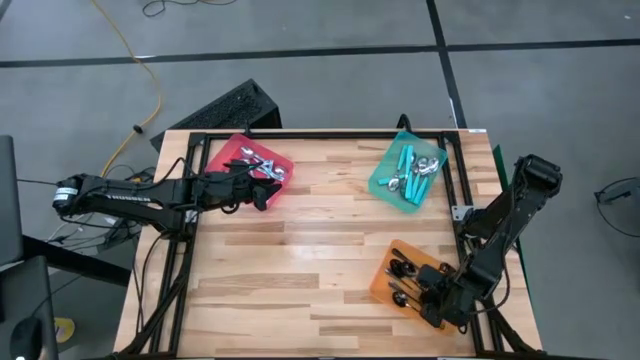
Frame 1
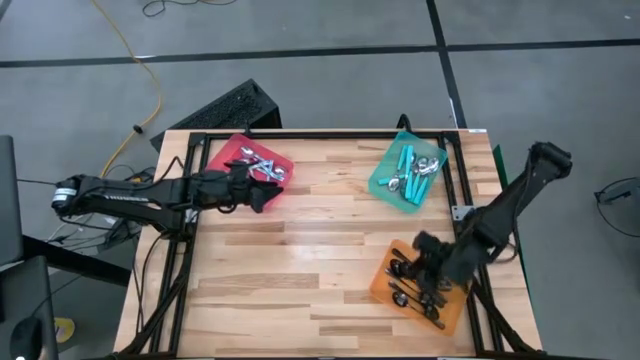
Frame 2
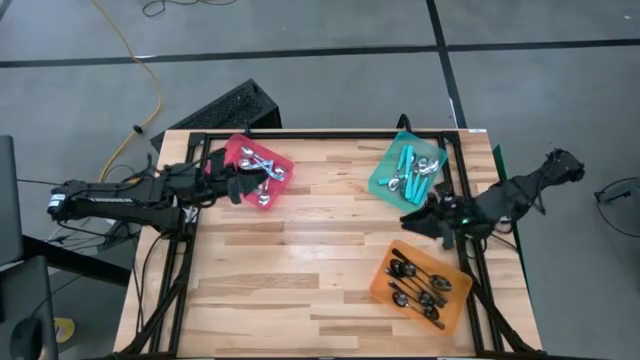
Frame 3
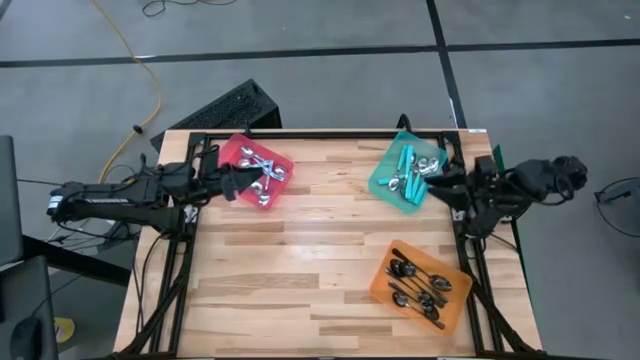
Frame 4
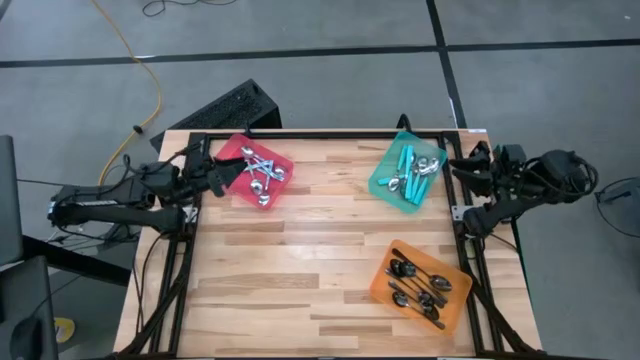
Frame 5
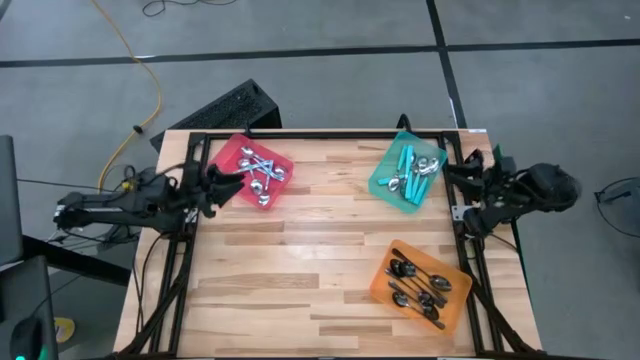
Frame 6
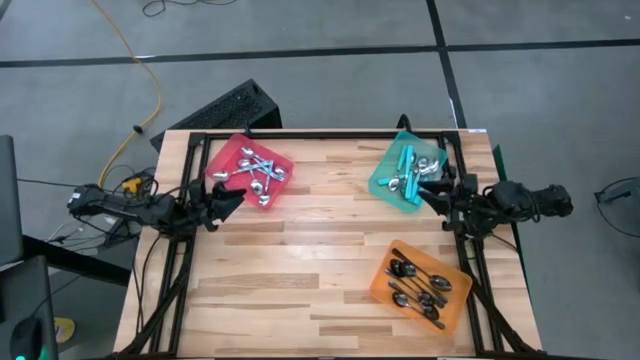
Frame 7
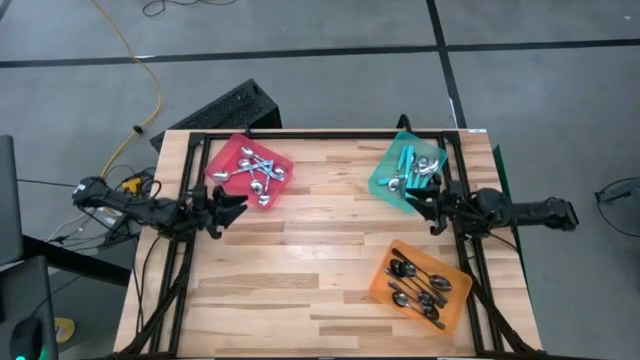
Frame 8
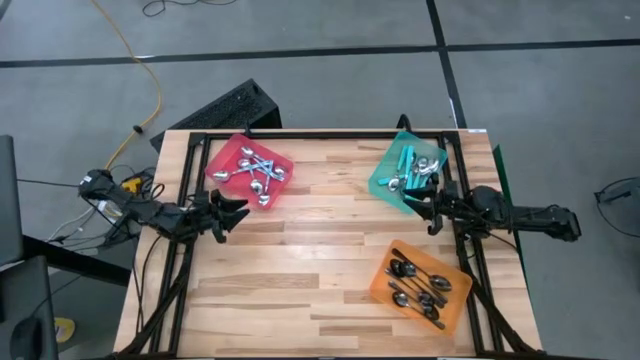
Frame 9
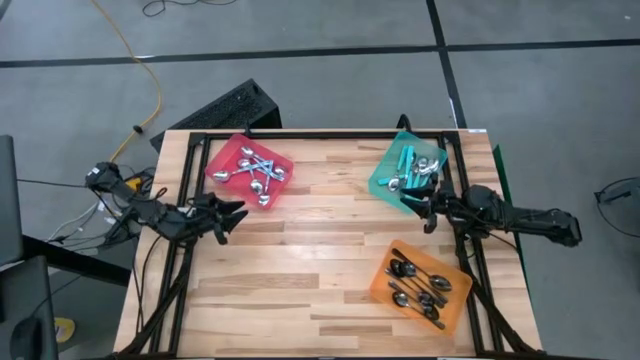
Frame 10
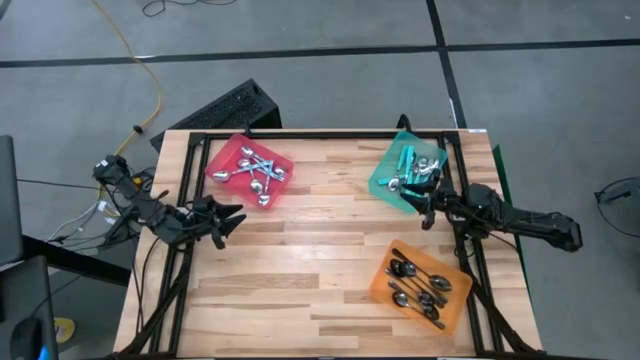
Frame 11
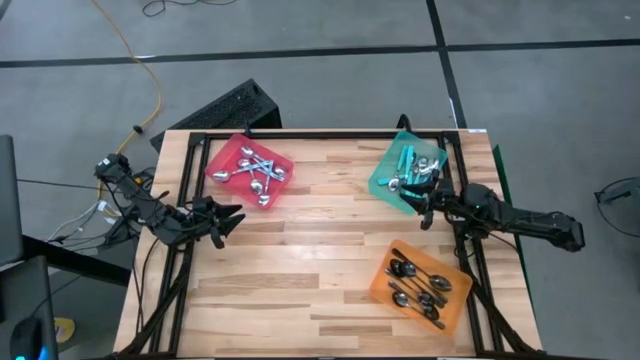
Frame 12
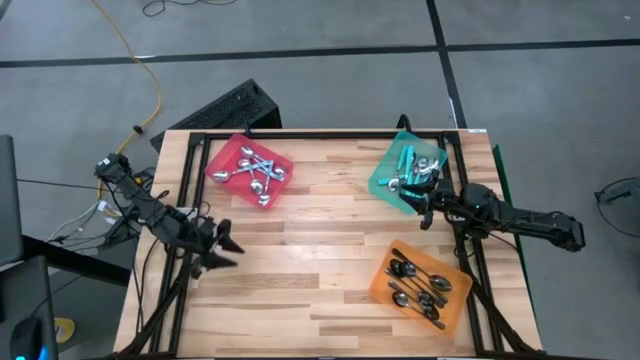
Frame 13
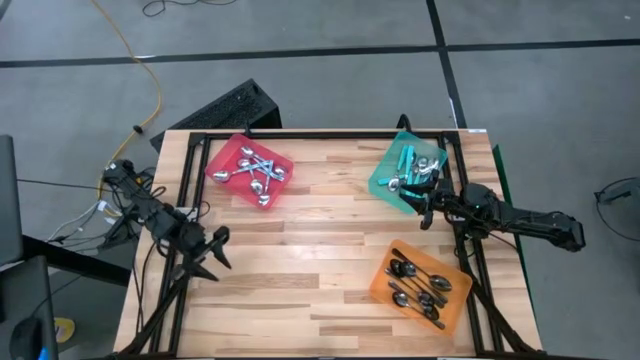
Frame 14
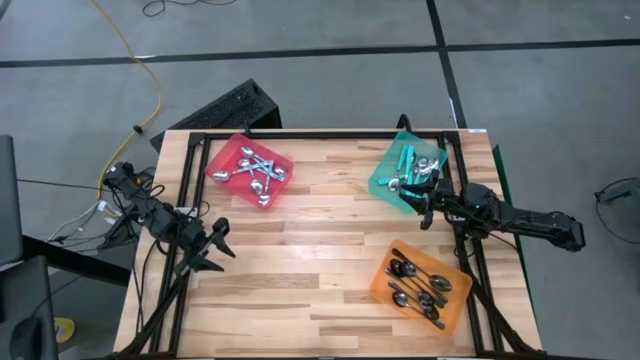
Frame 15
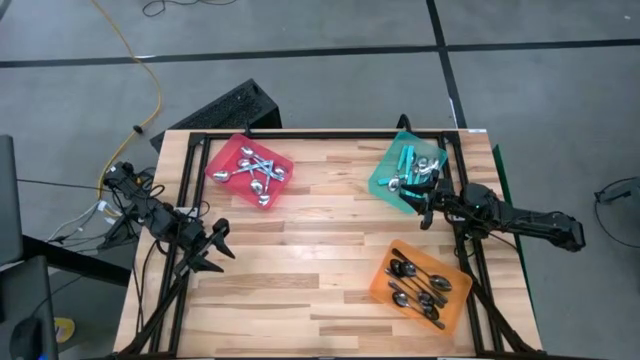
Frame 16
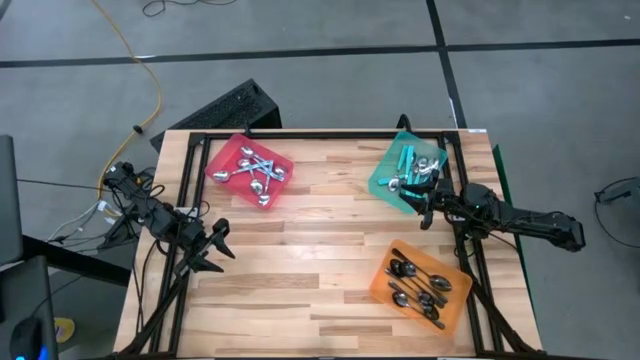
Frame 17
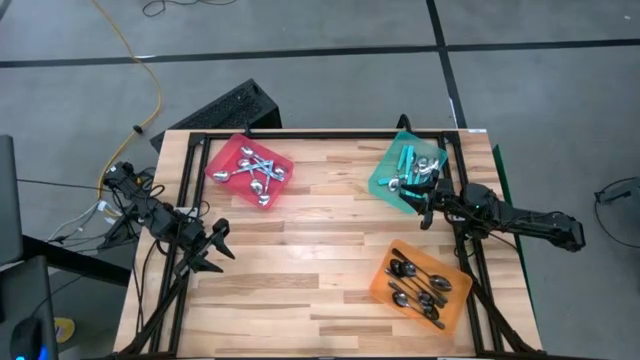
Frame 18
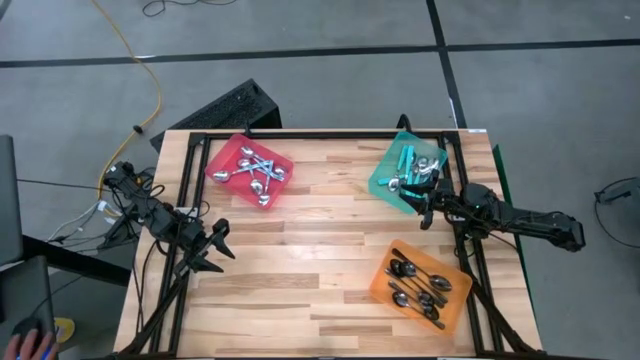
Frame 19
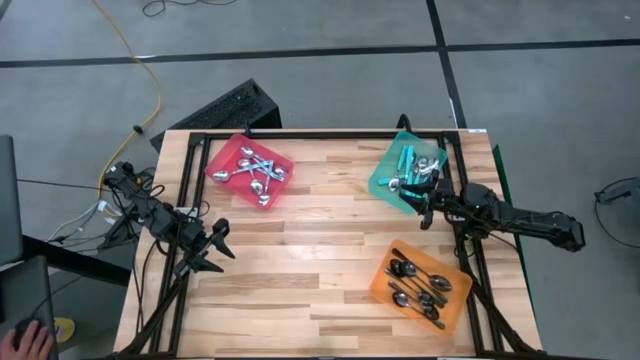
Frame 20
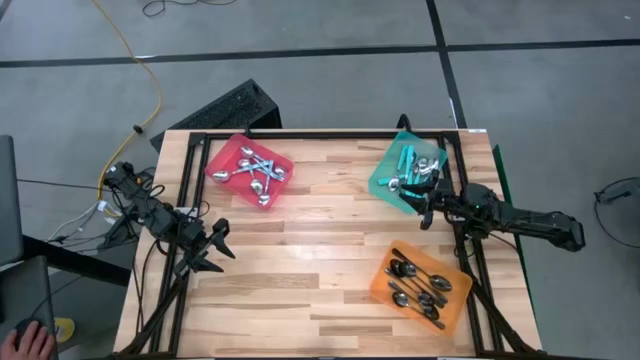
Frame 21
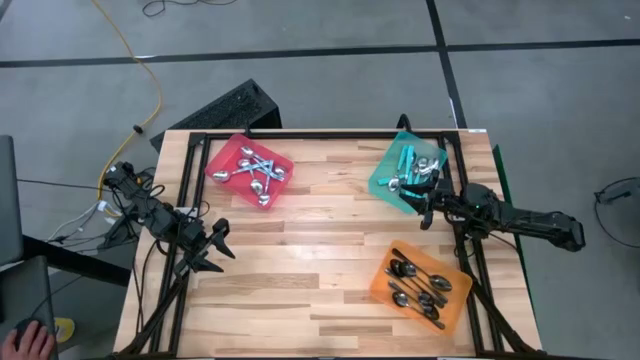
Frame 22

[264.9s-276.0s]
Task: Sort silverware by color (type)
Return to Home Position

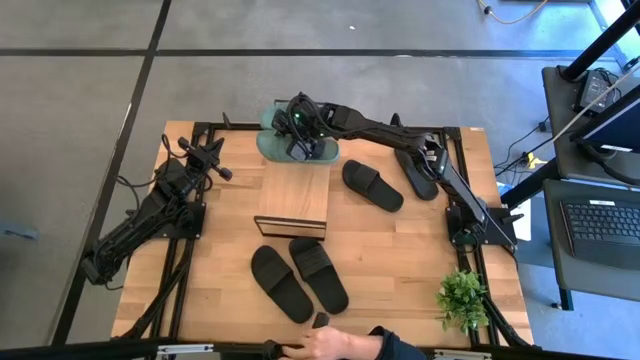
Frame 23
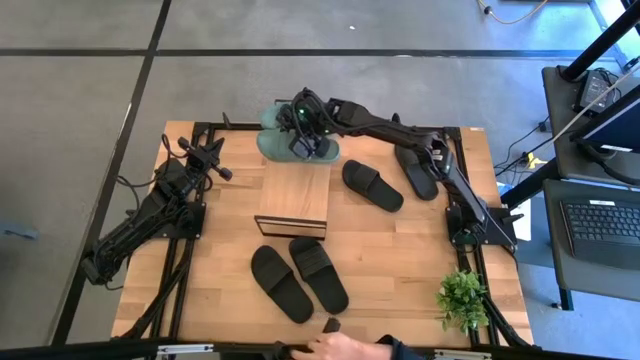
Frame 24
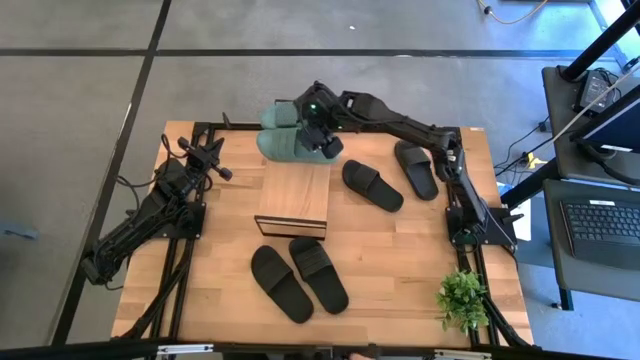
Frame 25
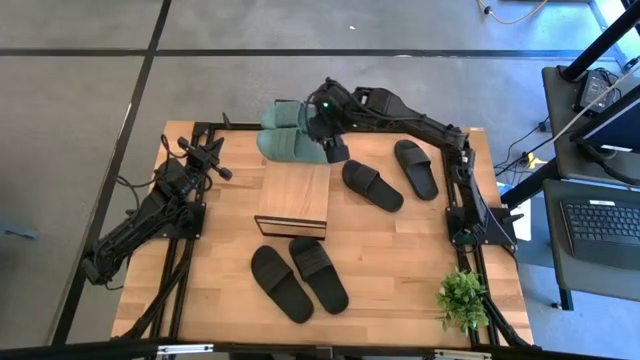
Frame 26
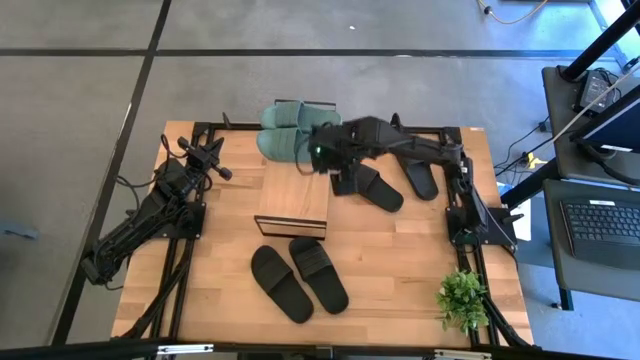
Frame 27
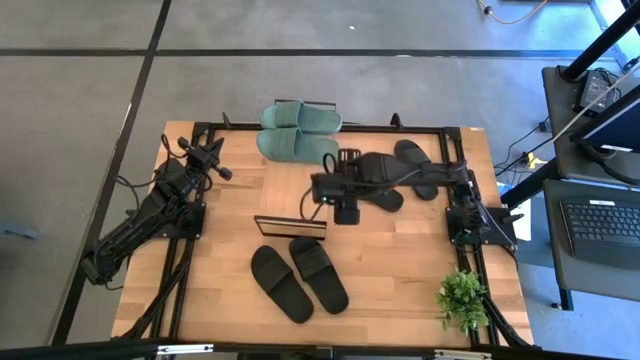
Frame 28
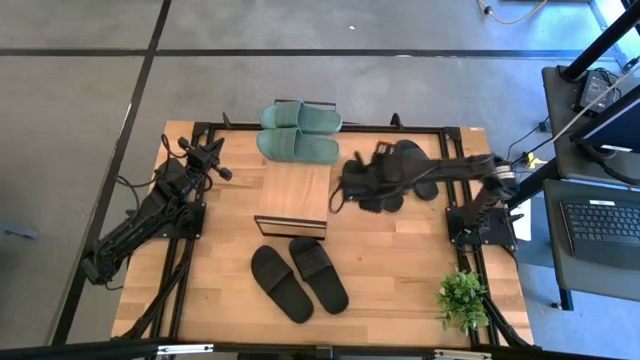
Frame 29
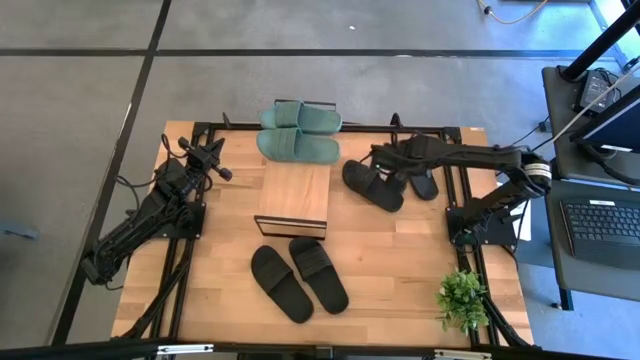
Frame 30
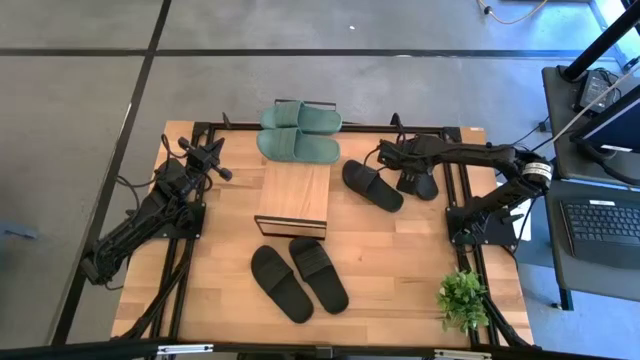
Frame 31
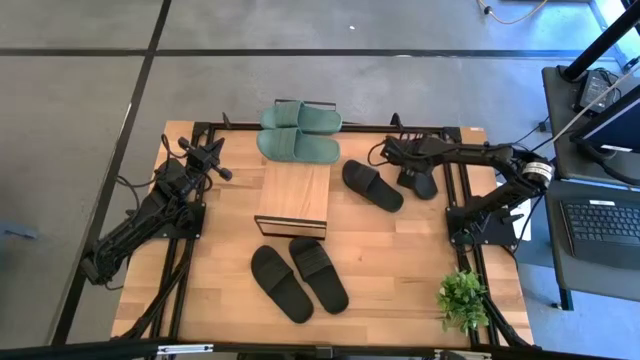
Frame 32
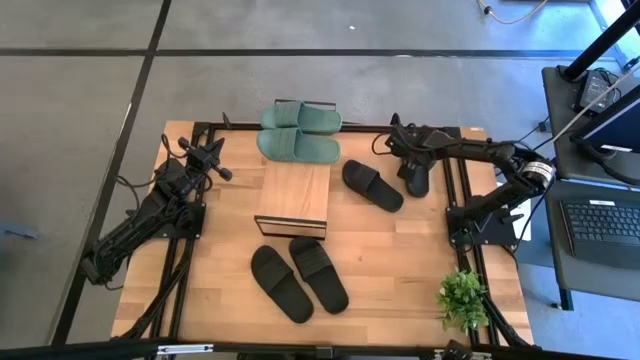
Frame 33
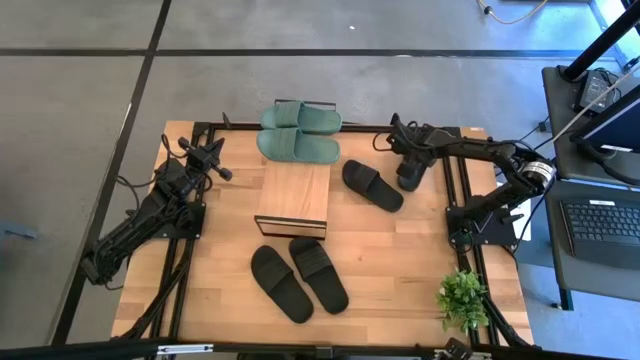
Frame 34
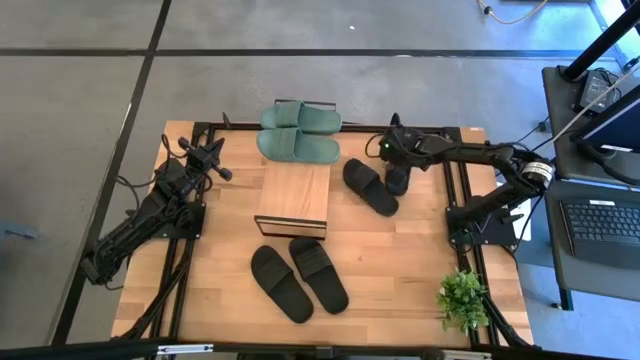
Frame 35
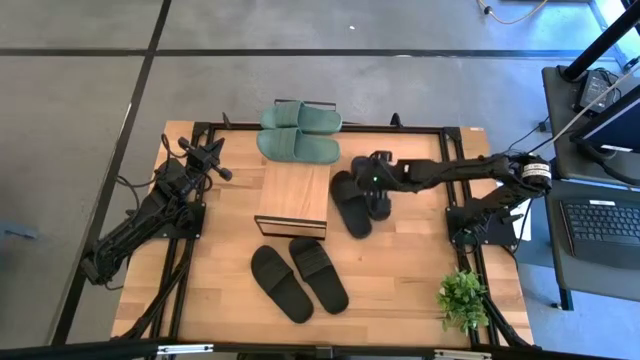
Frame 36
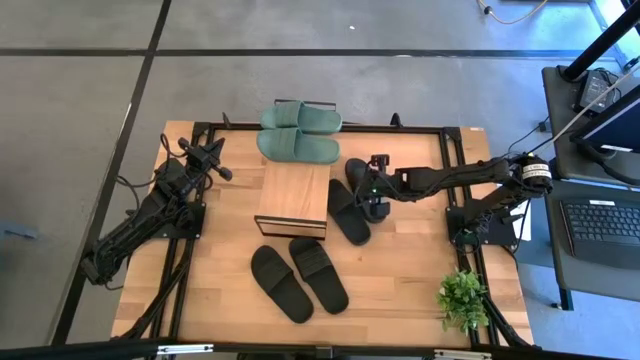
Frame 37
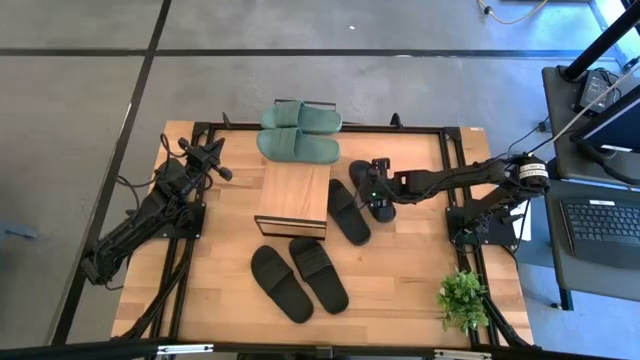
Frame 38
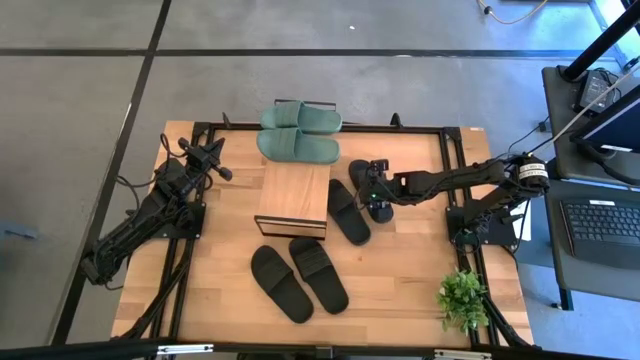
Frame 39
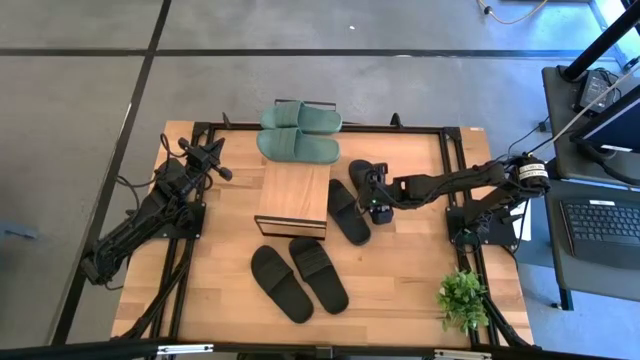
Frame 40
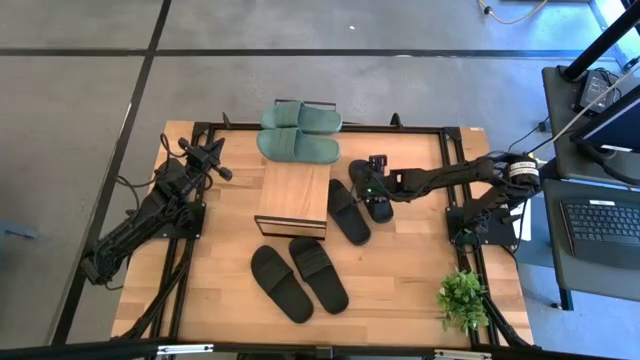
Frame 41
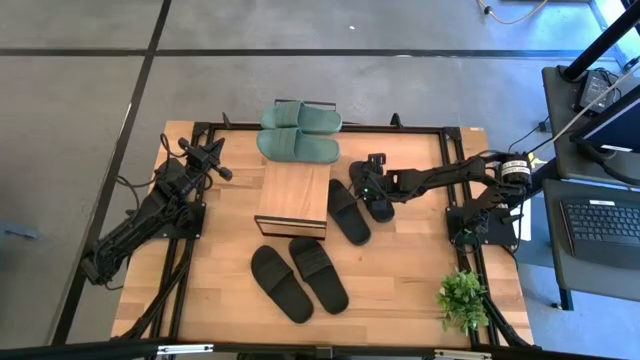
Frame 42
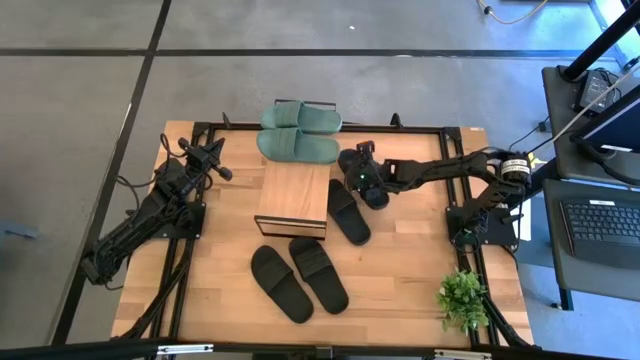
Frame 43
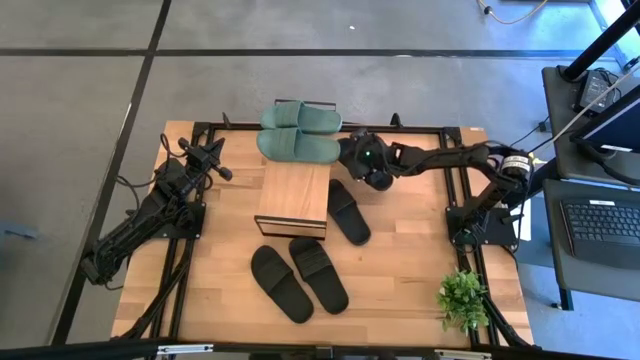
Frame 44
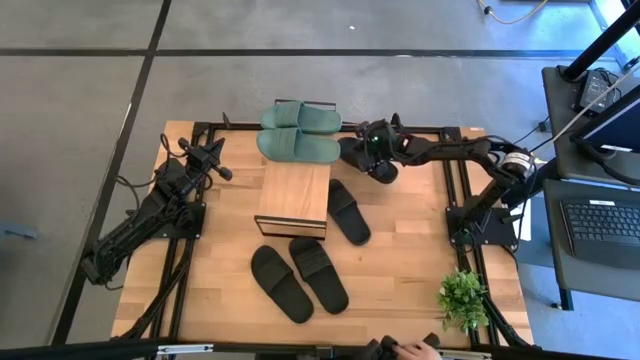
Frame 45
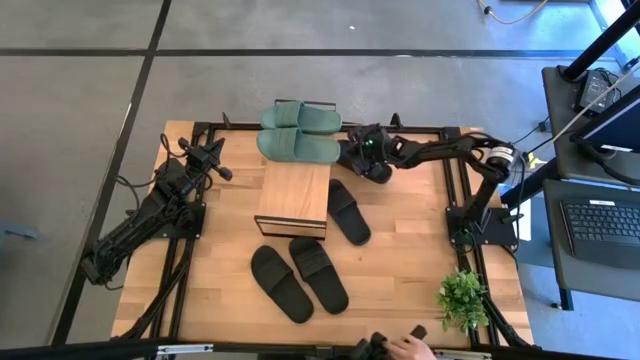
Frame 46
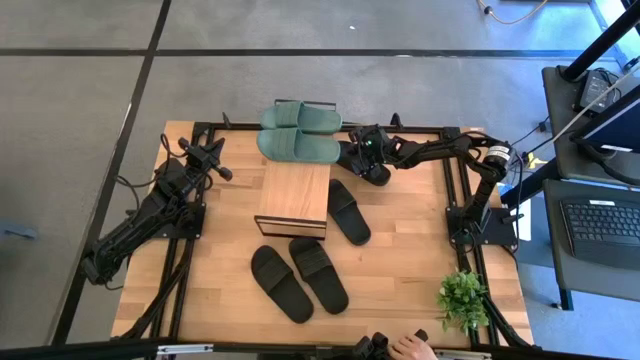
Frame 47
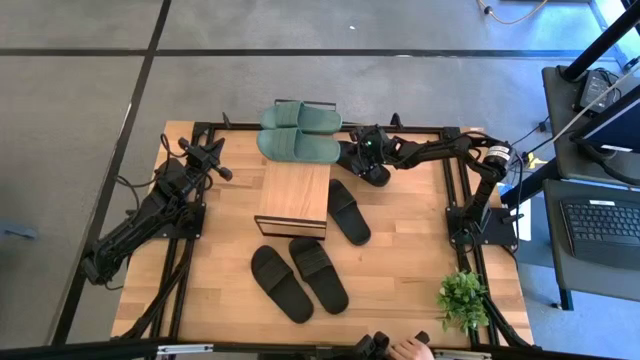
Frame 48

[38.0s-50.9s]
Task: Pick and place slides into the shelf
Put the black slide under the shelf
